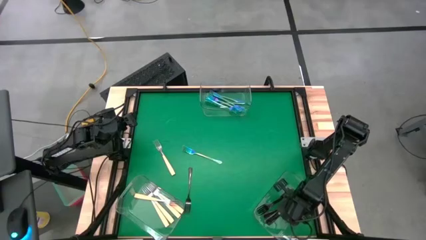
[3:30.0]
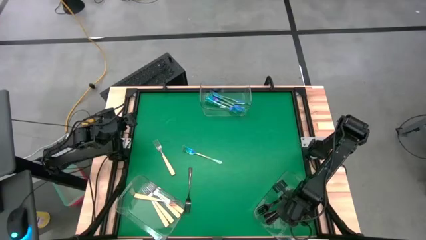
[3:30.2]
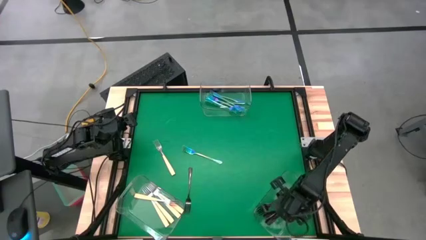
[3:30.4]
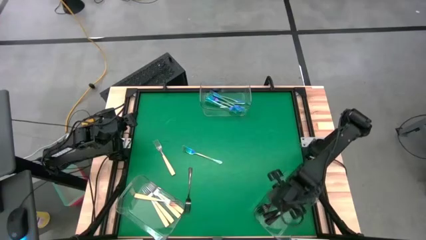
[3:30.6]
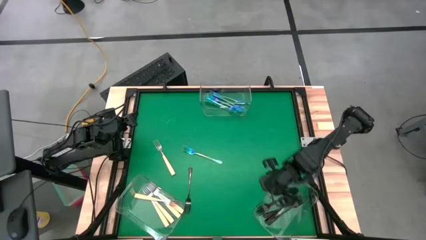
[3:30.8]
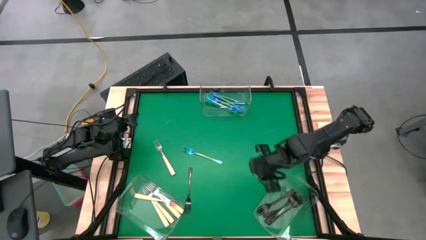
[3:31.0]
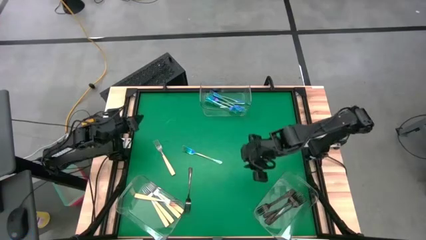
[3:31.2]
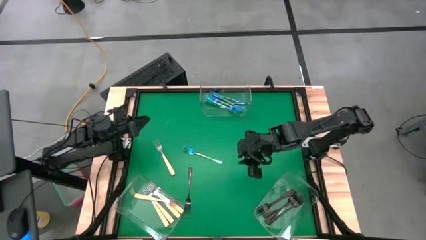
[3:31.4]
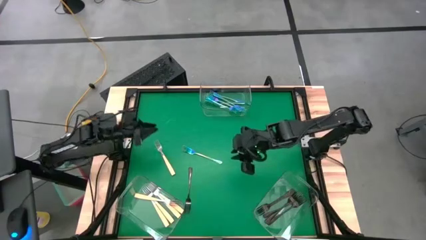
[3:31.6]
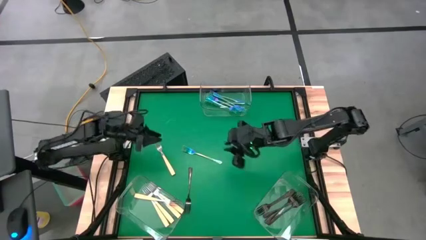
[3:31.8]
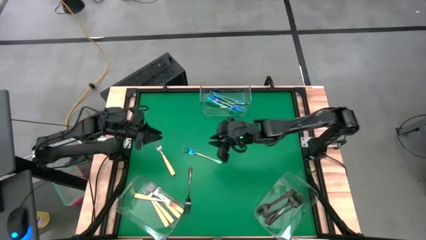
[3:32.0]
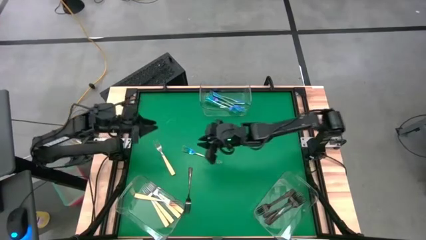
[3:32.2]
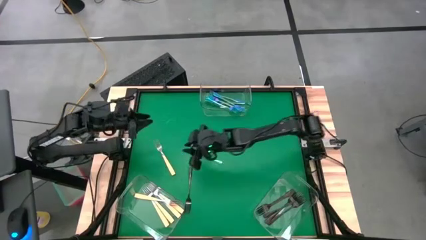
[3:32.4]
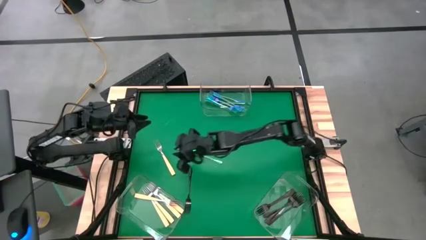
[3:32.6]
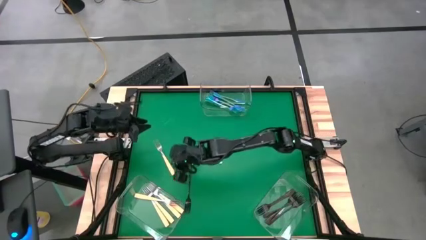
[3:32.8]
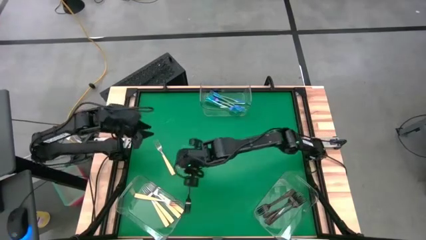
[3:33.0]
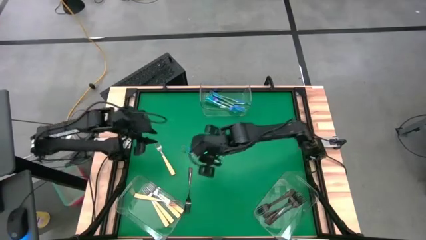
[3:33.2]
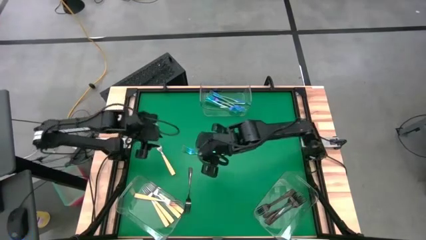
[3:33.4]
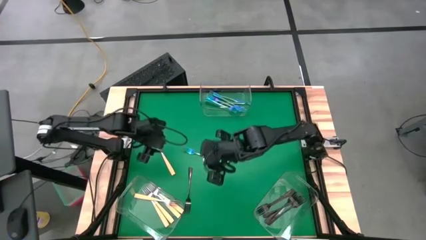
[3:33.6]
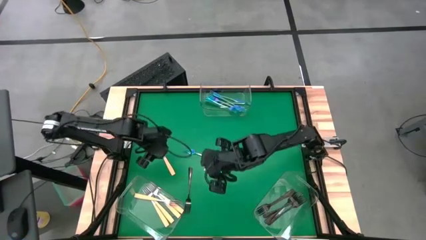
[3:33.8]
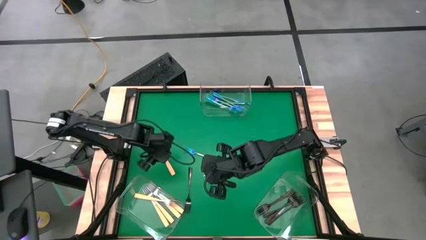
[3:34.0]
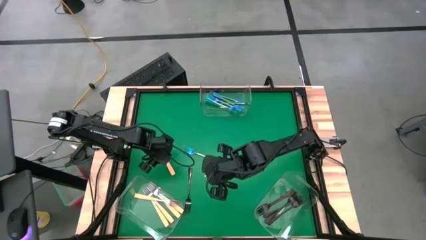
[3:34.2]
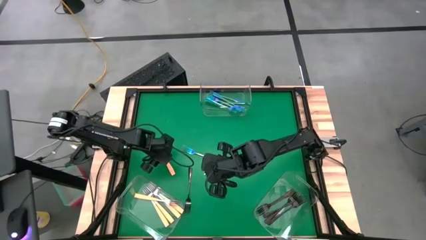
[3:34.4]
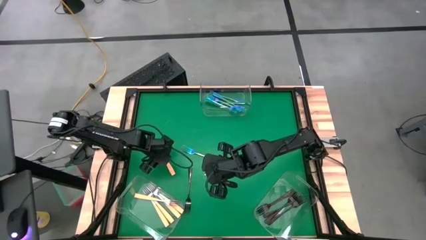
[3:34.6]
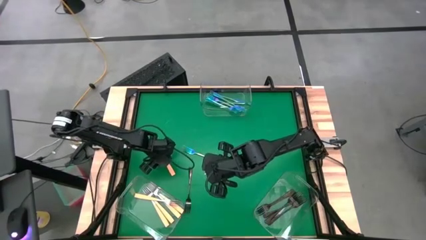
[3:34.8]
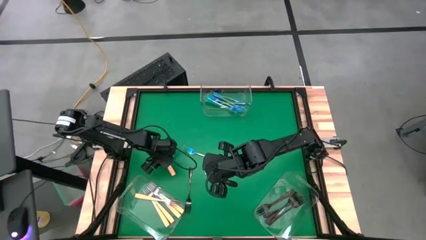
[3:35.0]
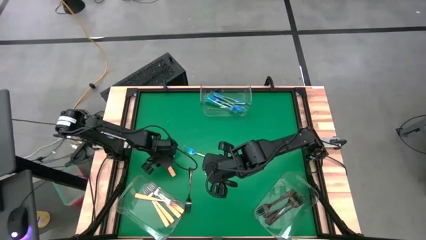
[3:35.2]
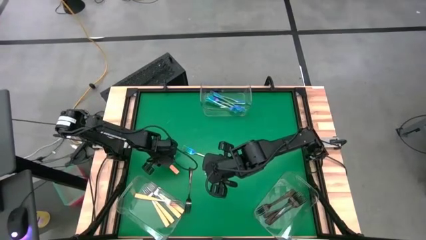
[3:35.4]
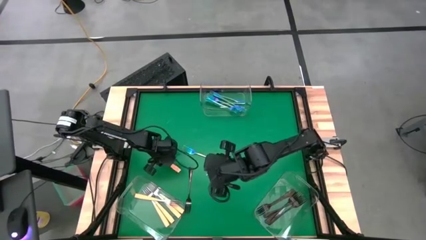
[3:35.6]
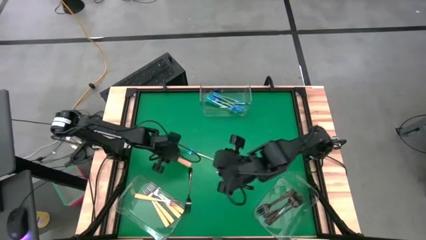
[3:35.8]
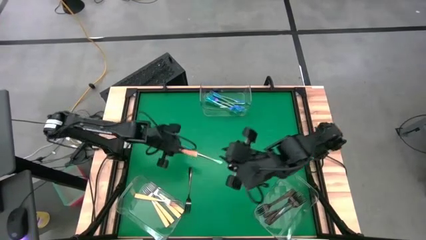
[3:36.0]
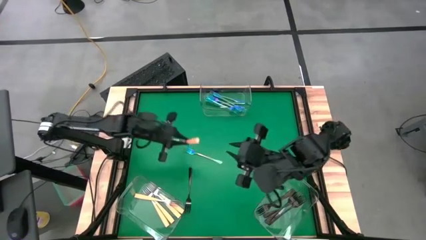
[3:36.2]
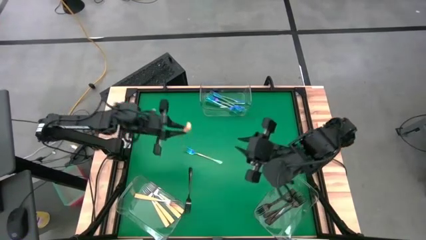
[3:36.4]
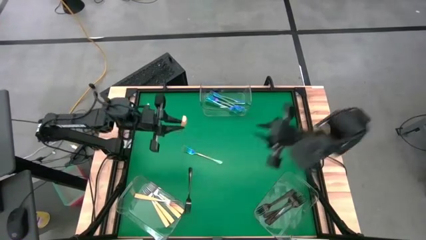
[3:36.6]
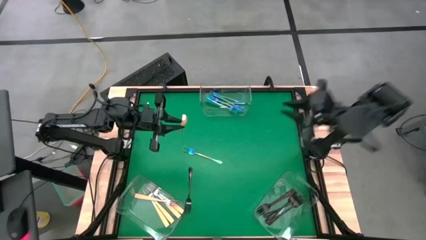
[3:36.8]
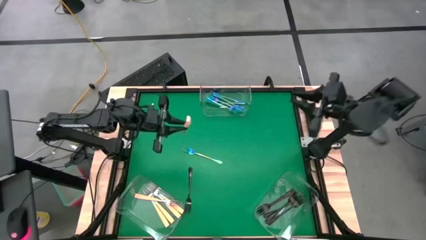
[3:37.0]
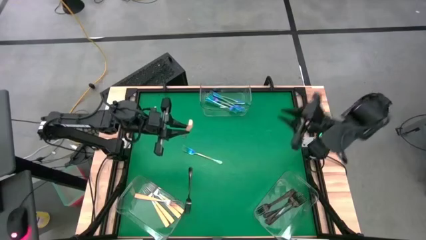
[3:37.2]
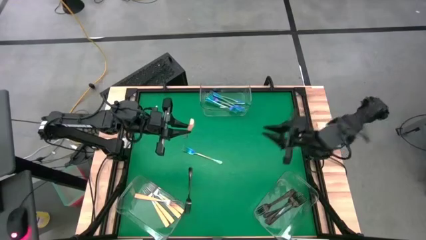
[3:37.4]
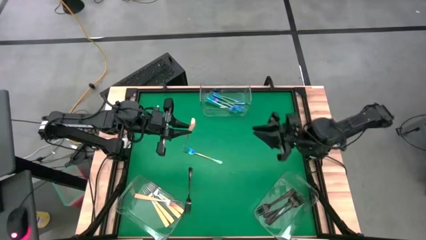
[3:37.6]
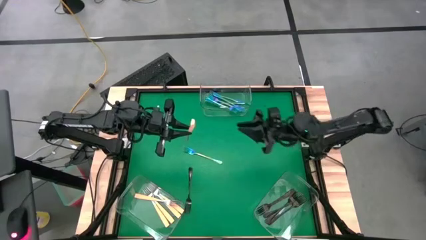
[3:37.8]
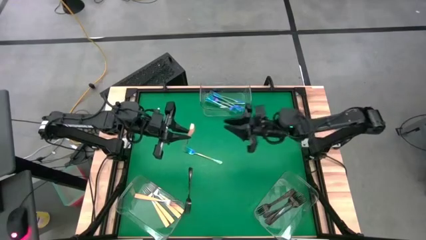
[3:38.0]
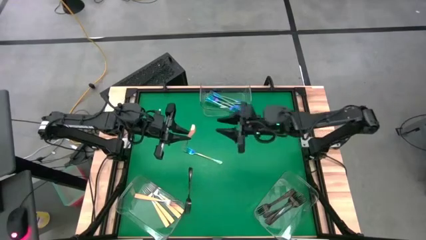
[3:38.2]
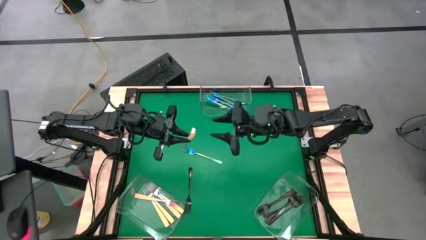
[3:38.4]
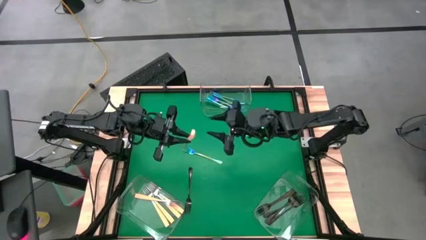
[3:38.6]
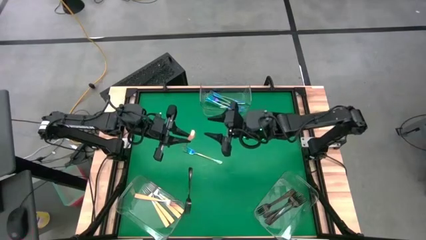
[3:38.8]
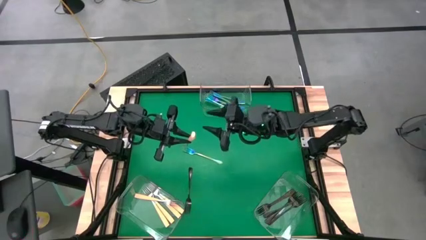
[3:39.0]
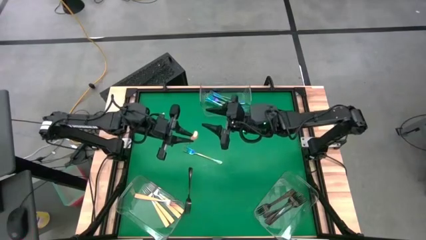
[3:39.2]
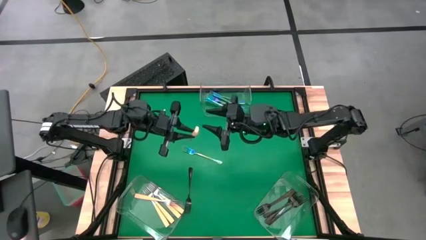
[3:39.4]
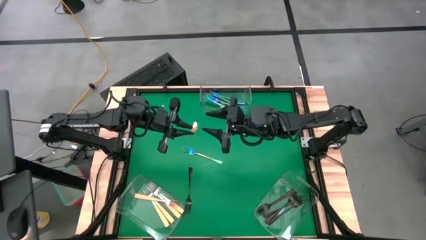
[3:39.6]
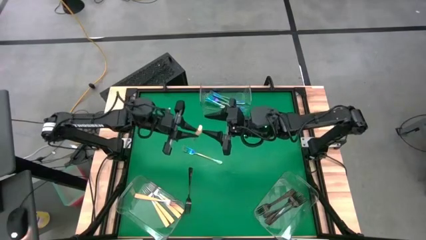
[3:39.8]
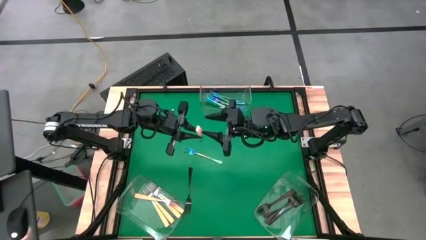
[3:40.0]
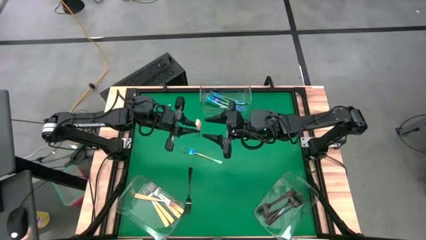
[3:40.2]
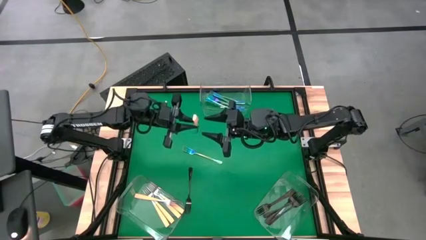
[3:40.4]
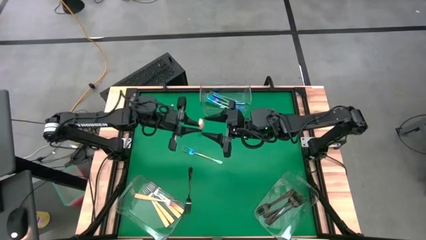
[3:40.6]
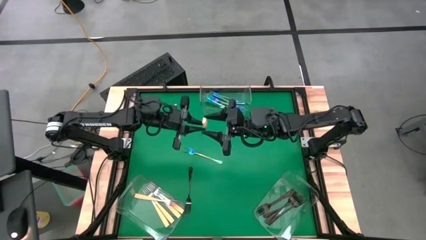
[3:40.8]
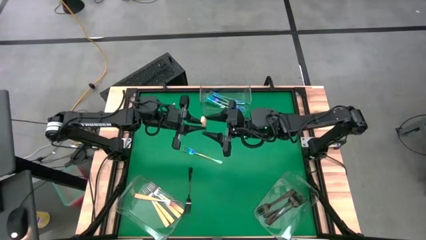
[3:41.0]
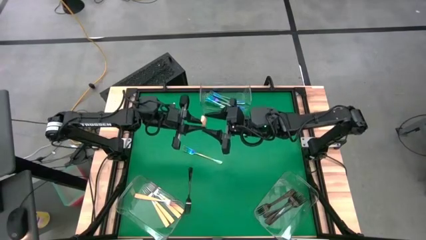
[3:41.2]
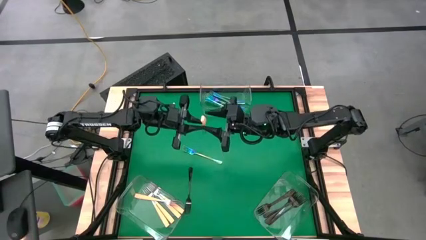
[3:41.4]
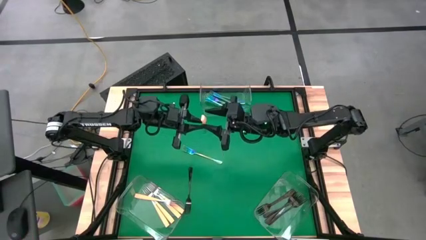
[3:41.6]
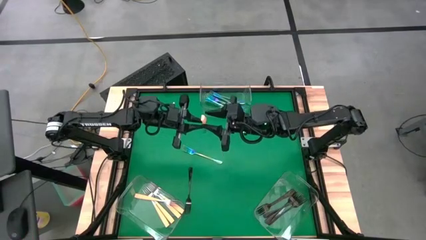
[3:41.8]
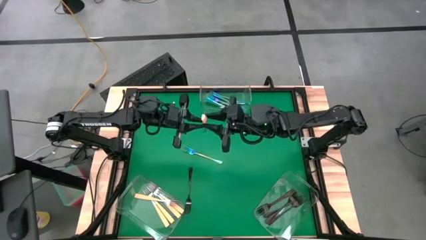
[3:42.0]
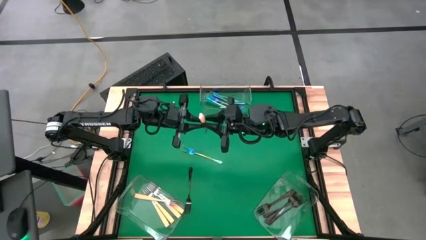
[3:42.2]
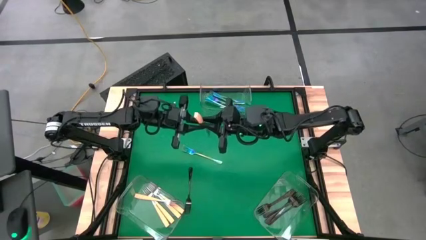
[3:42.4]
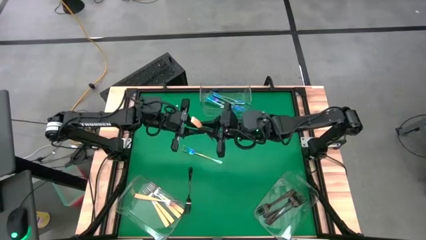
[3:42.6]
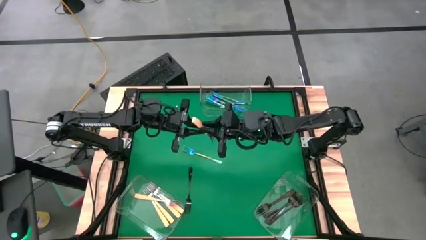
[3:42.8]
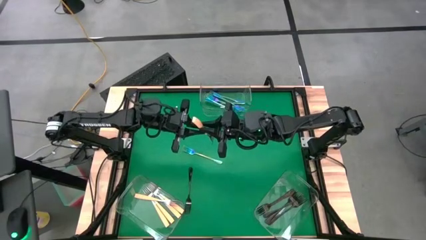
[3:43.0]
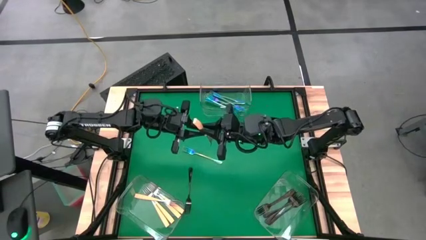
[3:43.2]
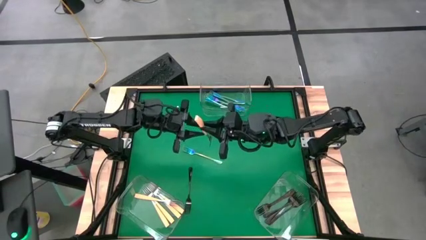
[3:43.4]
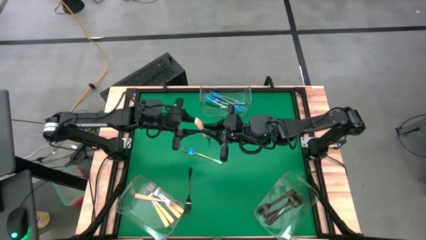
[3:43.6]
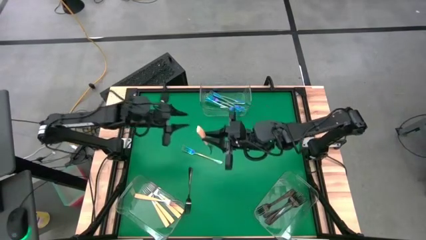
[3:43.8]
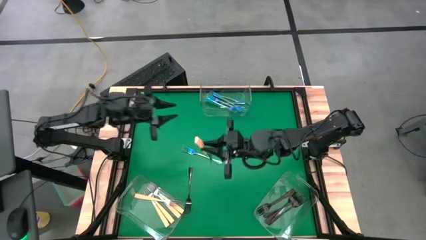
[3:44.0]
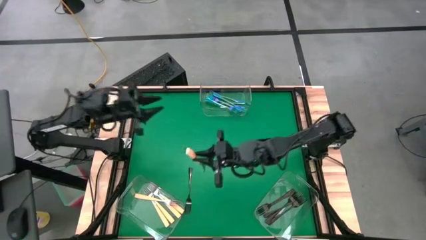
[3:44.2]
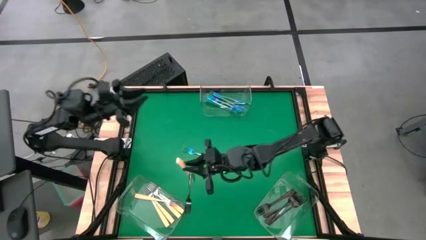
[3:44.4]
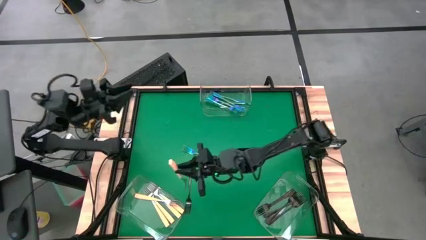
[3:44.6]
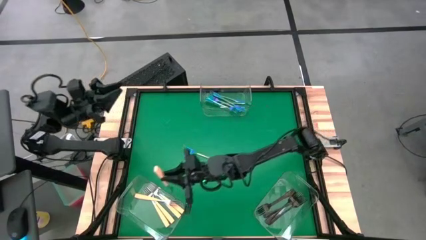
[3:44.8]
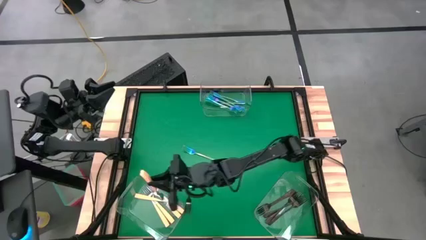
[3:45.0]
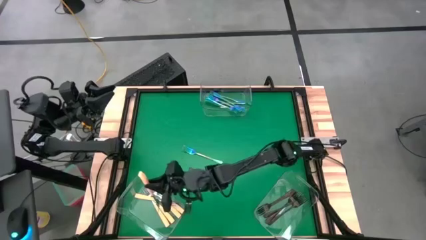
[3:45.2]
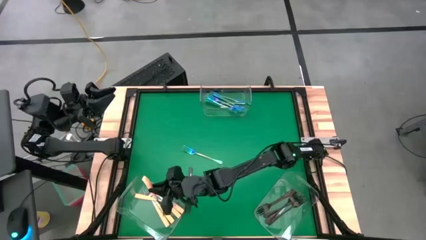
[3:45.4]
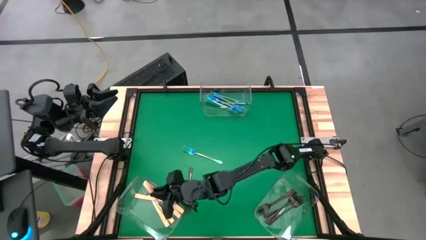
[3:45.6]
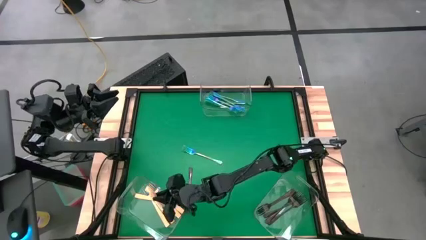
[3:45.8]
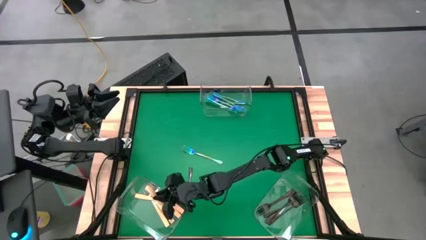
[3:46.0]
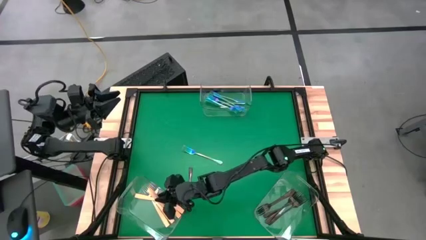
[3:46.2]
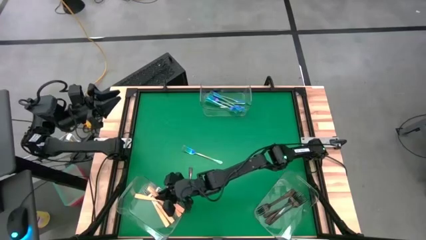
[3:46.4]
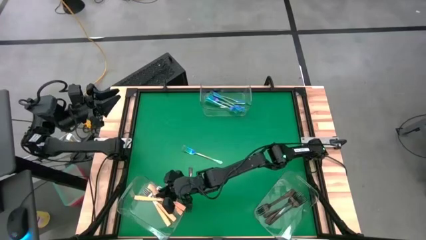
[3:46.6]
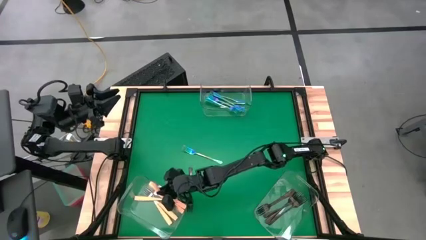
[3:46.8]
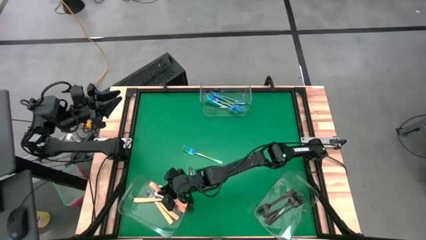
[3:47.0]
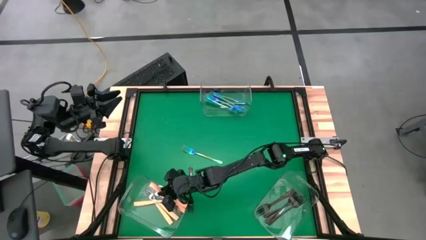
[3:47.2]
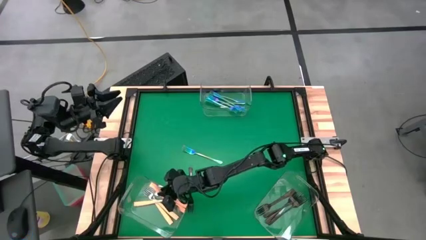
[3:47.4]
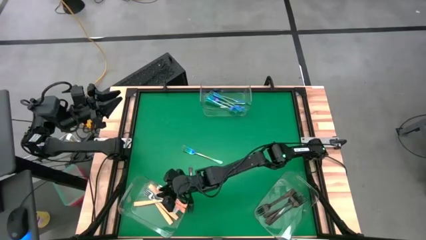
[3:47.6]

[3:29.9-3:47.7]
Task: Sort silverware by color (type)
Put the orange fork into the bottom left transparent bin
